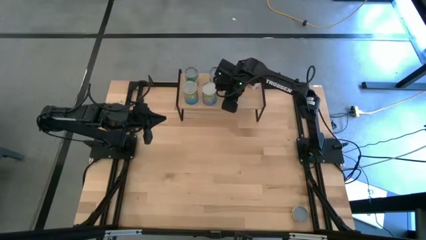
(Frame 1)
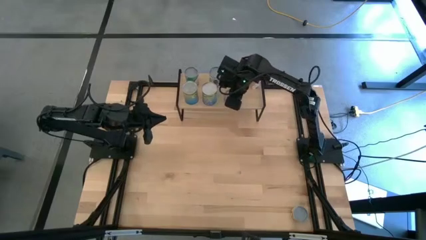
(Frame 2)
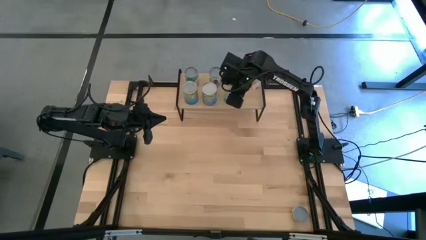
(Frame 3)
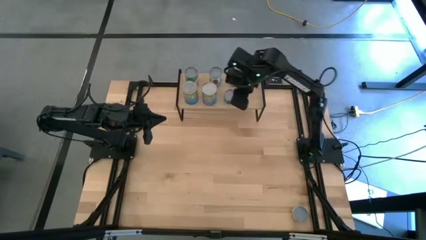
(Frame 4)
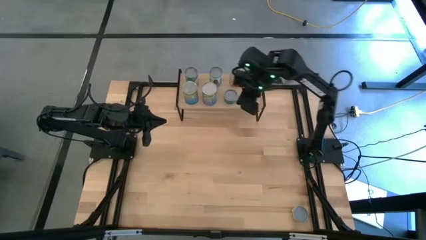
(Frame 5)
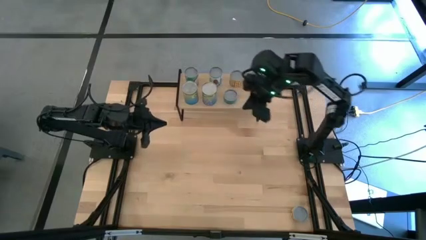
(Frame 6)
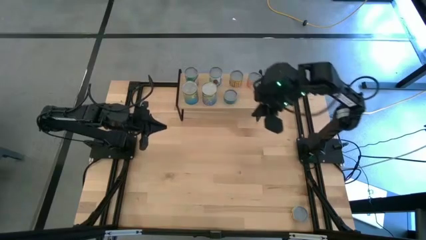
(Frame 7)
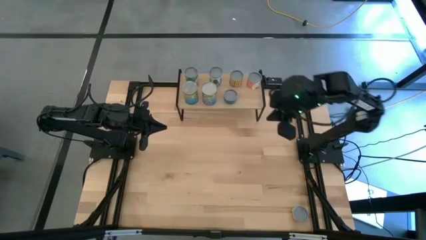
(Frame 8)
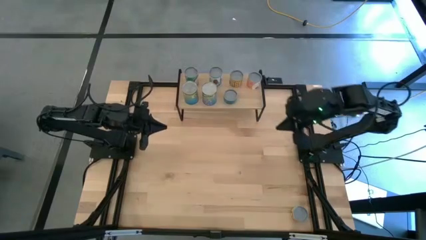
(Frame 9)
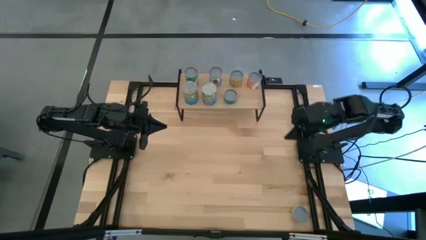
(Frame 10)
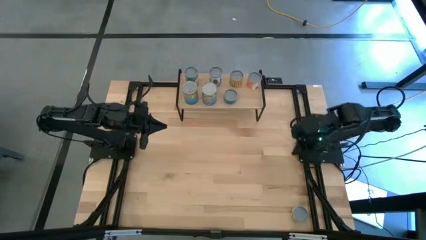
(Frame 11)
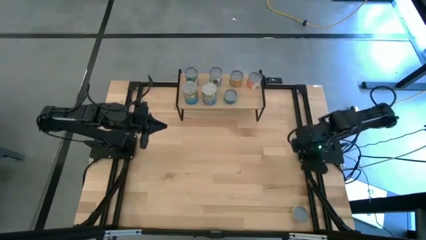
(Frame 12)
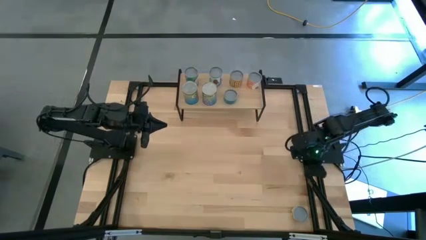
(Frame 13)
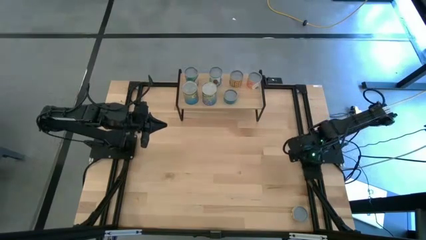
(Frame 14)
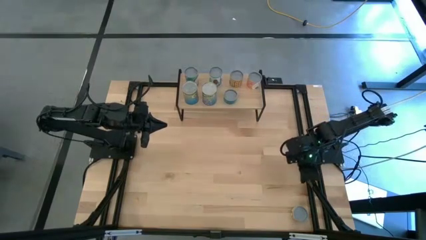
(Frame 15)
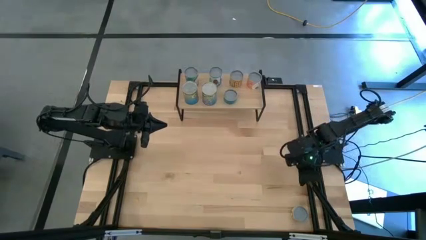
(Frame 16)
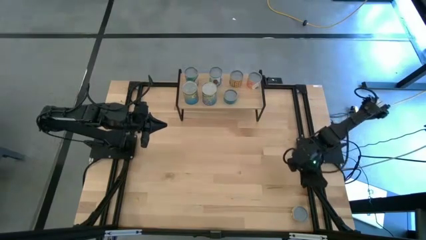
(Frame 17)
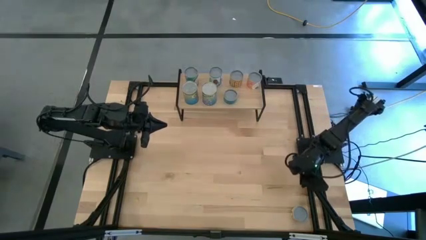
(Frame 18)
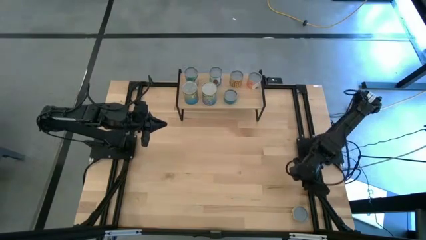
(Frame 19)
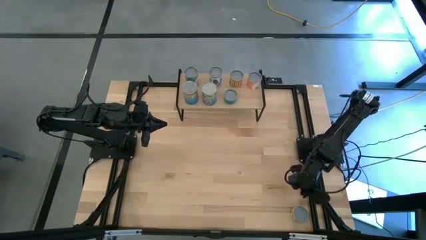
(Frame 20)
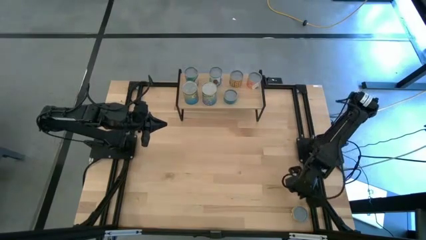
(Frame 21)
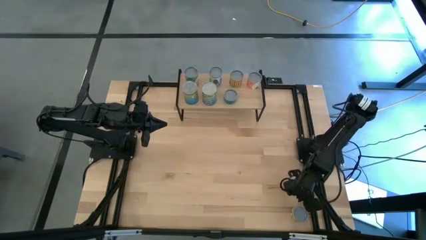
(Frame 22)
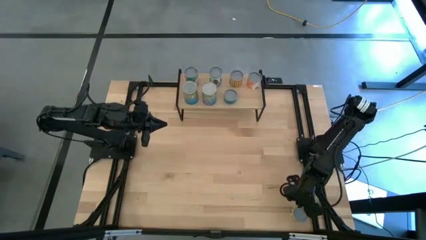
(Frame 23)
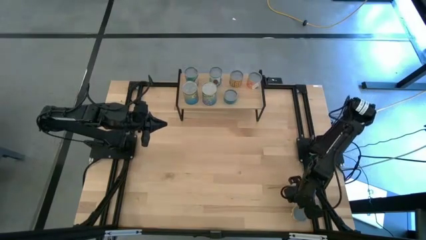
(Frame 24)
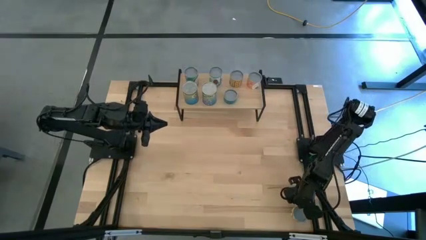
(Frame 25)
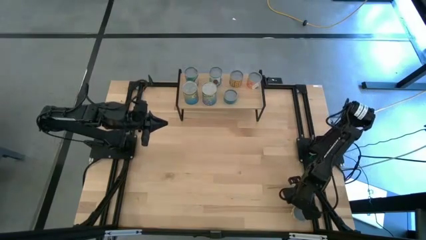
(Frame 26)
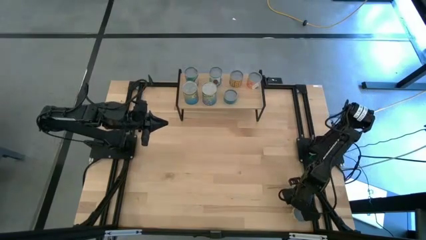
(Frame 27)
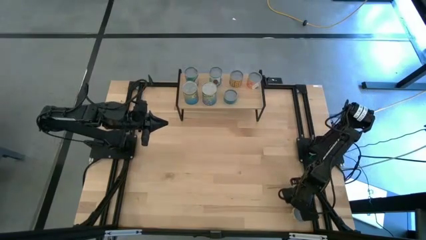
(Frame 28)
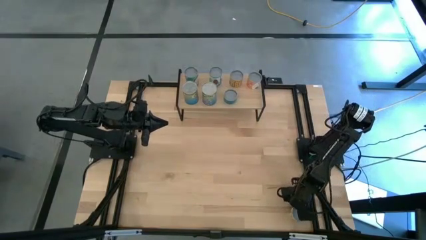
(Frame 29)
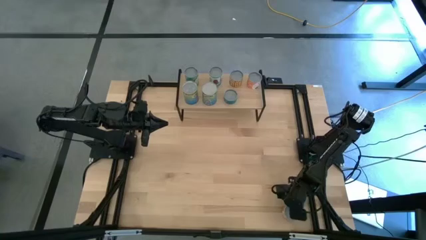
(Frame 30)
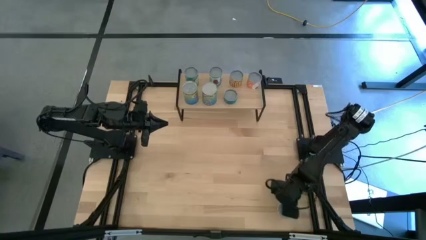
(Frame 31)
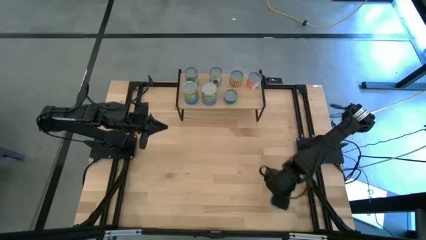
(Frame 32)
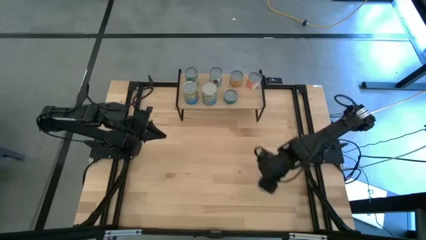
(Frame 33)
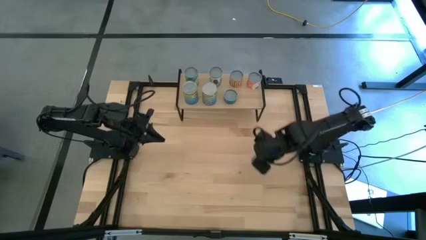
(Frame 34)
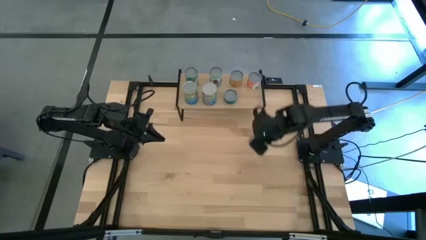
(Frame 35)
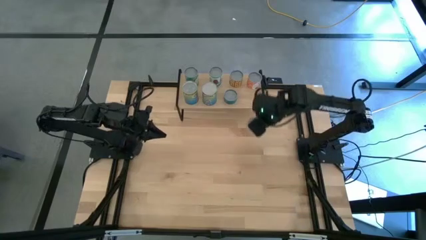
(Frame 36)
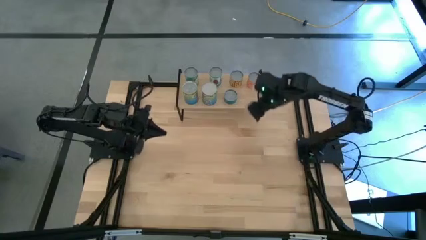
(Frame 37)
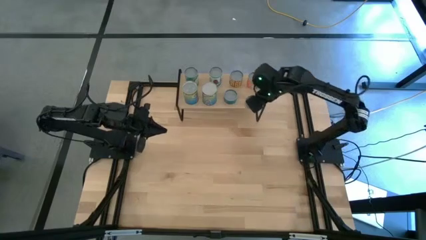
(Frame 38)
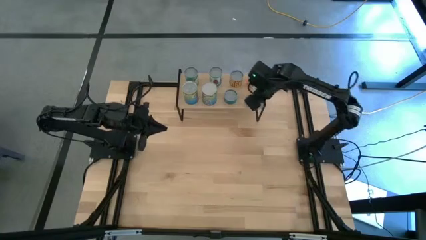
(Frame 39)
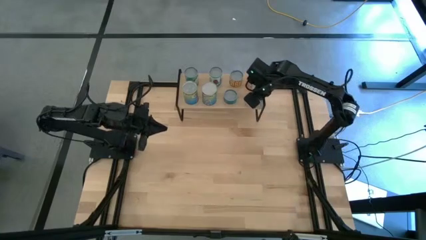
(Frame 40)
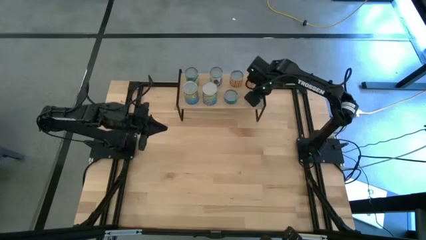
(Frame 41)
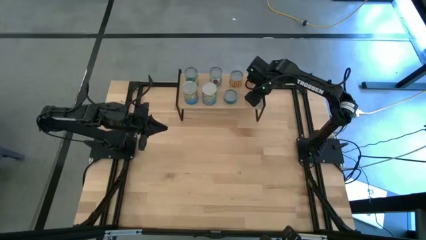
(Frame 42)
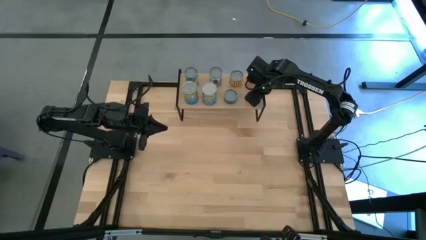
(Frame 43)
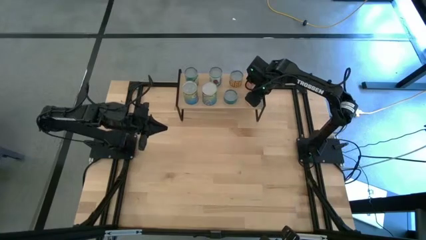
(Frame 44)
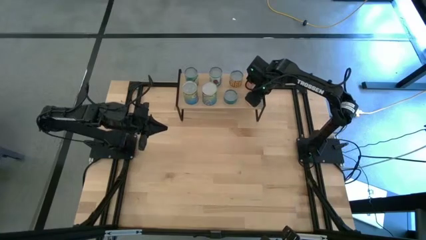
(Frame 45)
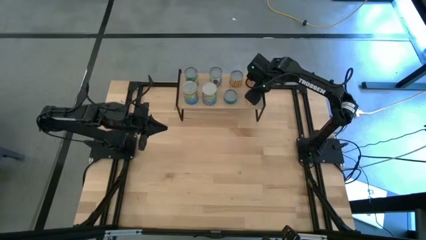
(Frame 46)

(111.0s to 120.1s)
Task: Pick and place cans onto a shelf
Put the yellow can on the shelf

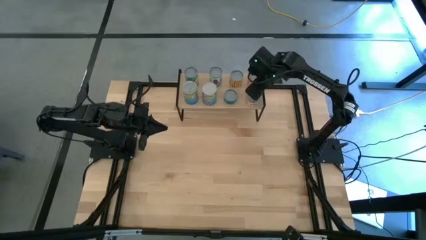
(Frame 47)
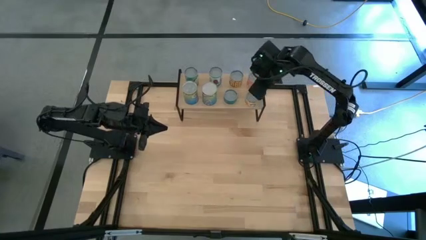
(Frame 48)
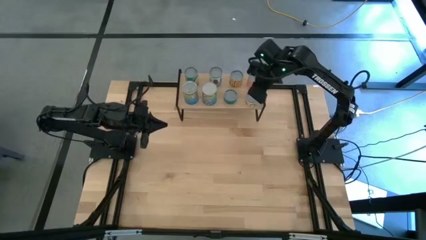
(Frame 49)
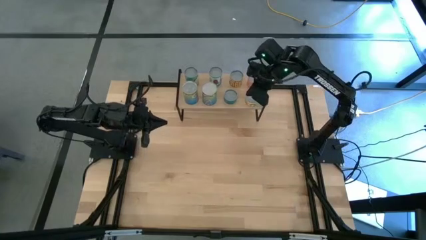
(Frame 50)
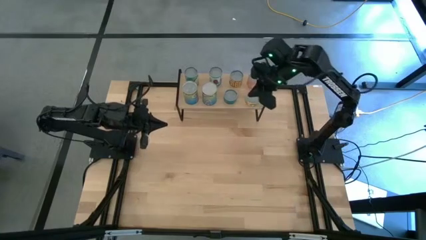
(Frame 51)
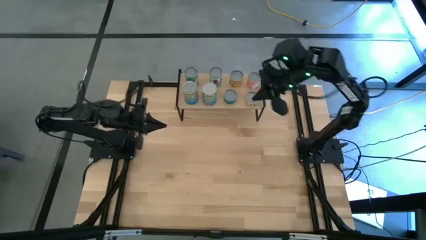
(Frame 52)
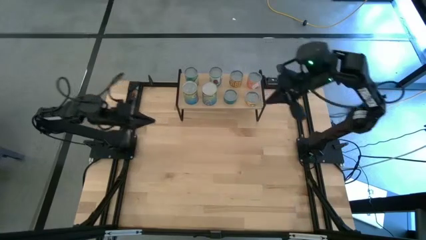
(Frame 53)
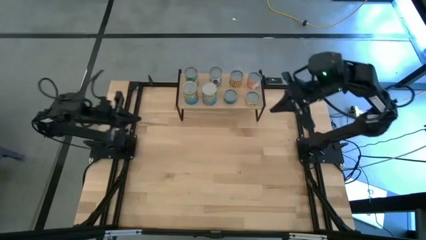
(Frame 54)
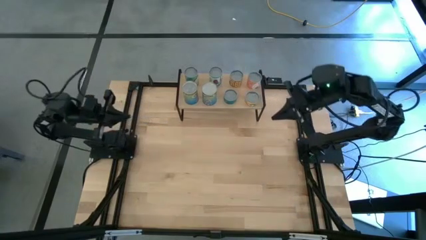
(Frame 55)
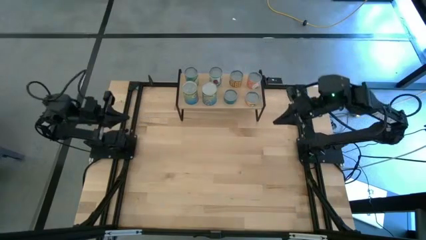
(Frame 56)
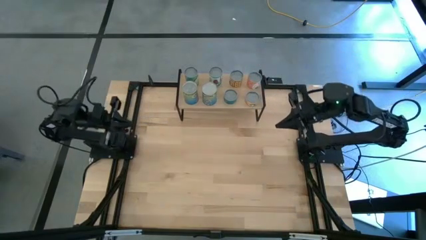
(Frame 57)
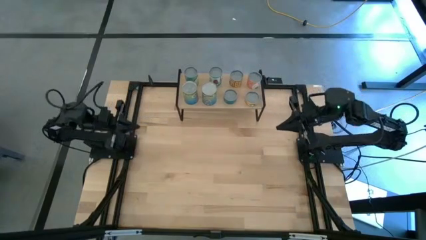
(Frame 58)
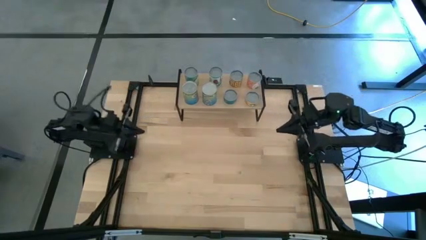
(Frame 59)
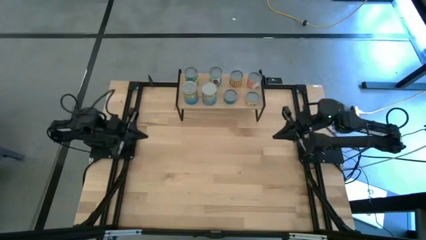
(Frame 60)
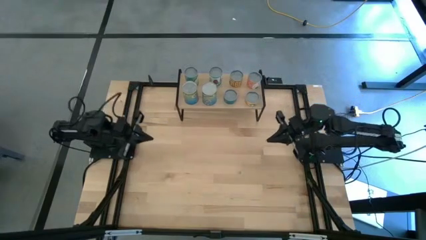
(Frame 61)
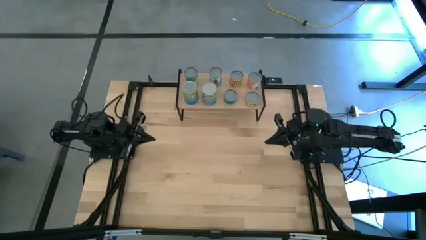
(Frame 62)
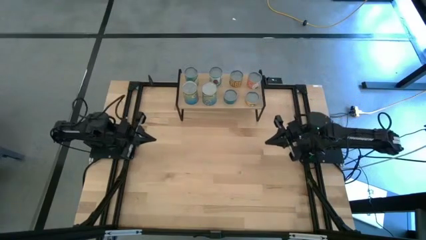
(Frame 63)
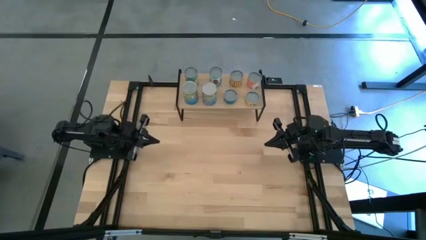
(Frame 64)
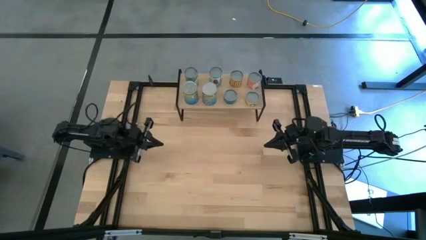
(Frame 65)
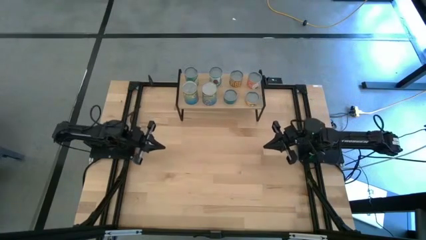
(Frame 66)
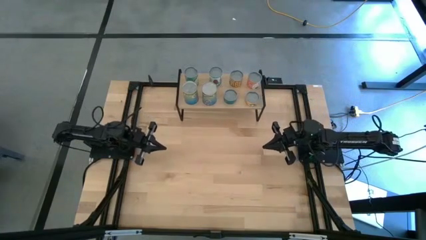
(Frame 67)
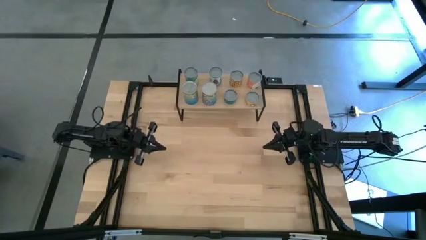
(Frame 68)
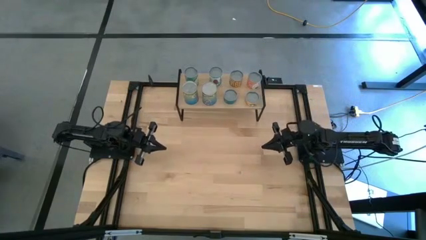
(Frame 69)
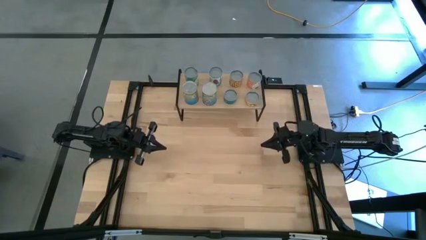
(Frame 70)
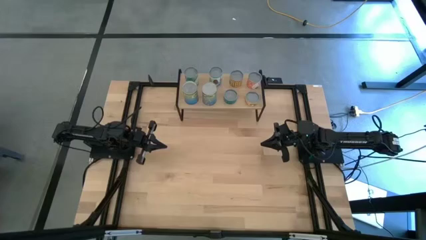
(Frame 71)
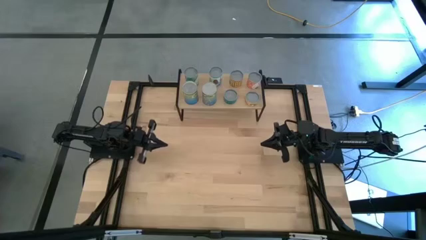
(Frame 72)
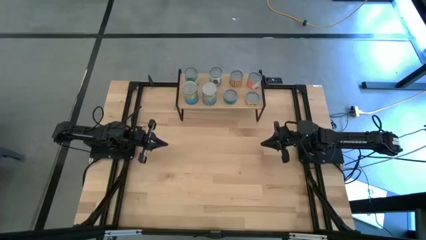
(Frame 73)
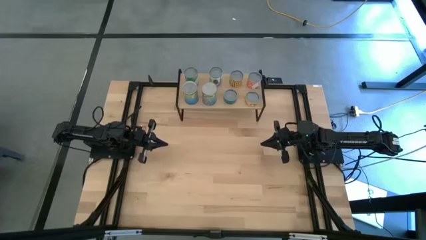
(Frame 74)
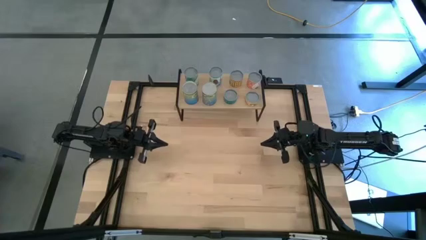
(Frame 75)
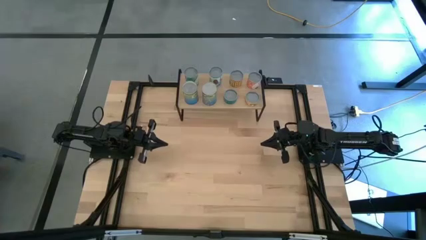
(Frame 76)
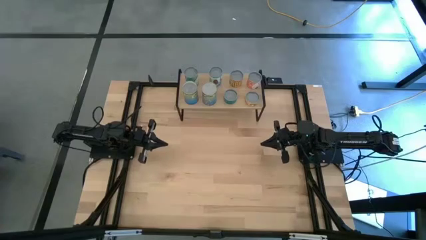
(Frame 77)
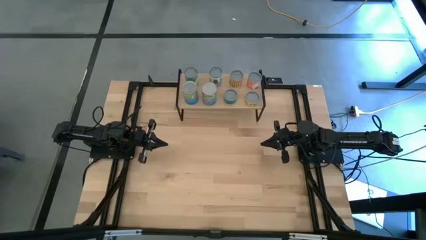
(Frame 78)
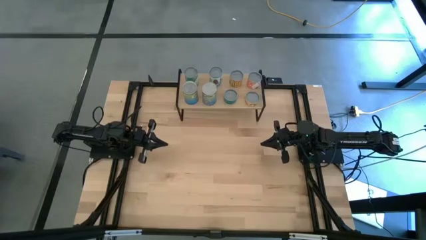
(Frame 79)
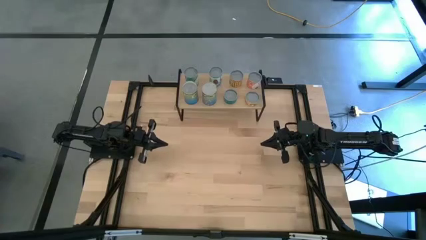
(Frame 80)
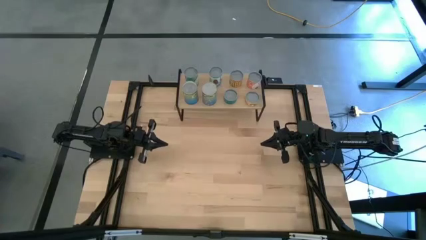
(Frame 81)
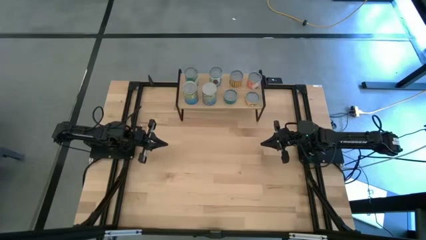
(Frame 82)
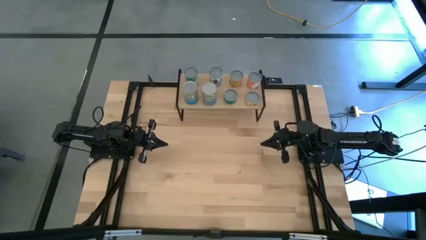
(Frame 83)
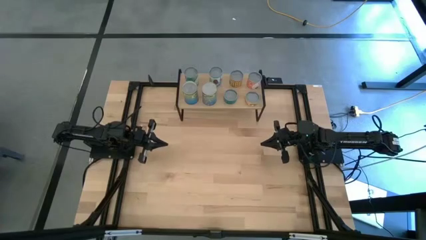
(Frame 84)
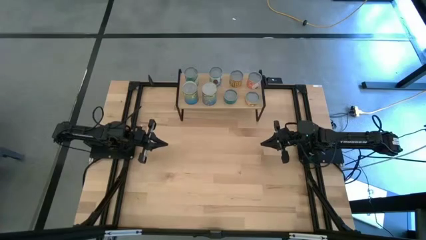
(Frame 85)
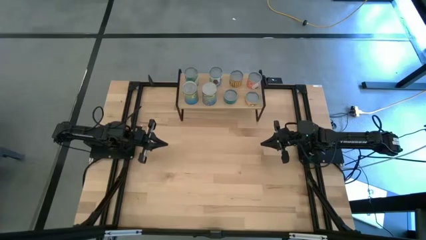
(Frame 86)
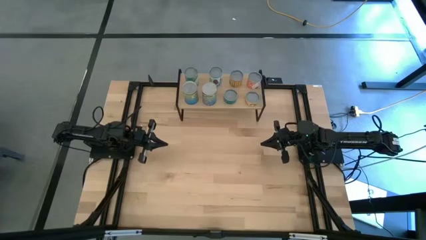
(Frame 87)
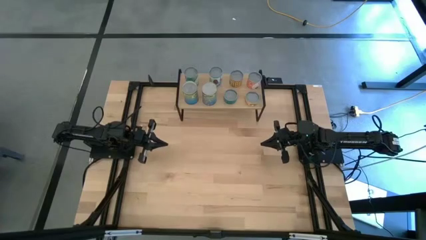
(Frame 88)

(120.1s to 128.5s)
Return to Home Position
